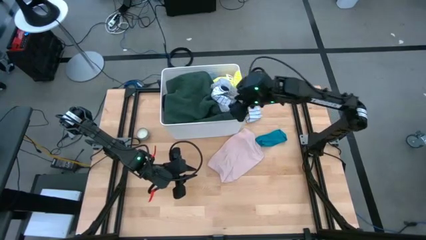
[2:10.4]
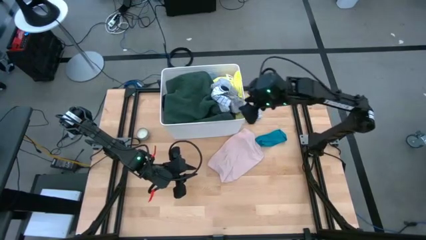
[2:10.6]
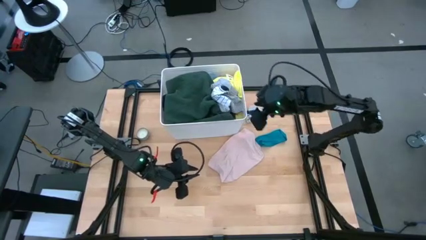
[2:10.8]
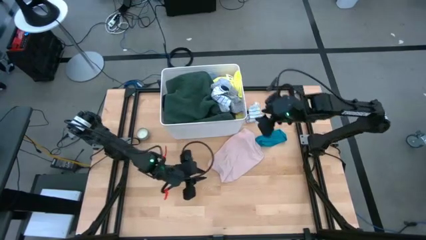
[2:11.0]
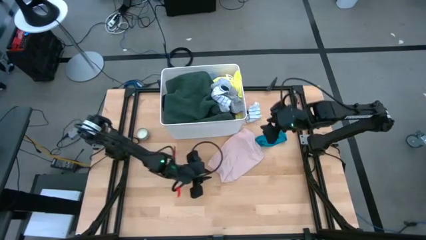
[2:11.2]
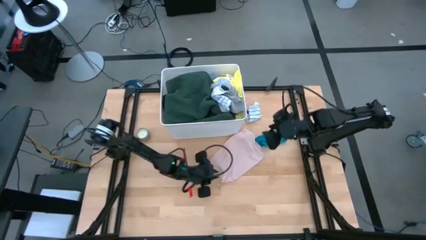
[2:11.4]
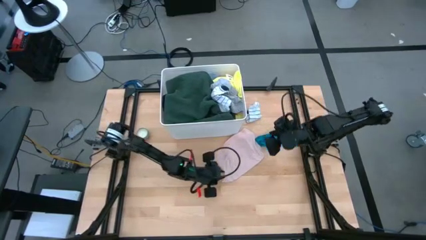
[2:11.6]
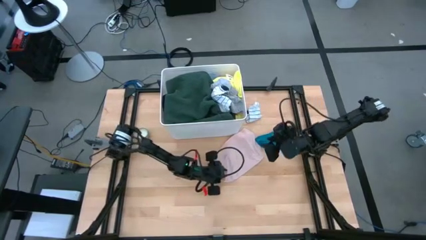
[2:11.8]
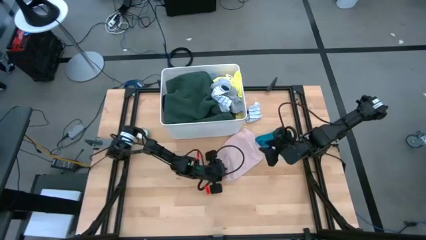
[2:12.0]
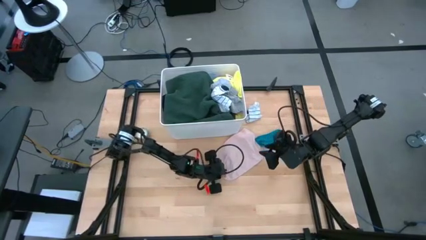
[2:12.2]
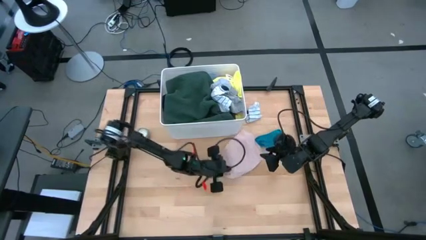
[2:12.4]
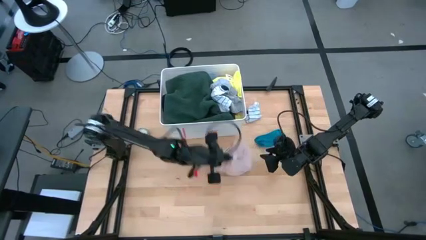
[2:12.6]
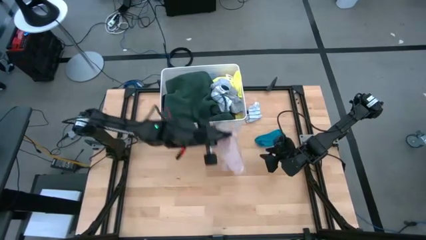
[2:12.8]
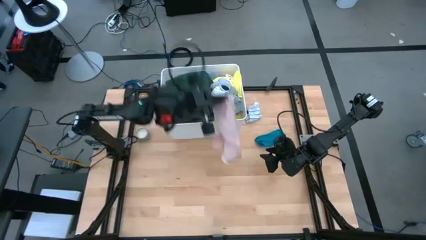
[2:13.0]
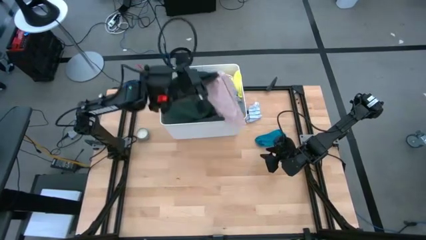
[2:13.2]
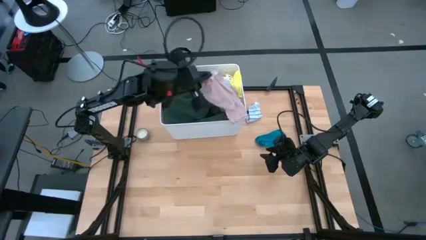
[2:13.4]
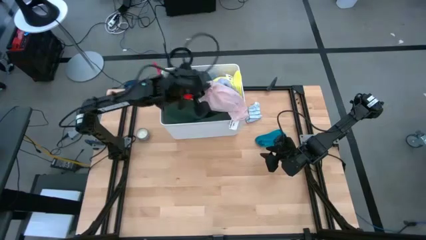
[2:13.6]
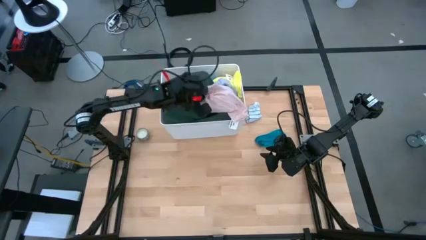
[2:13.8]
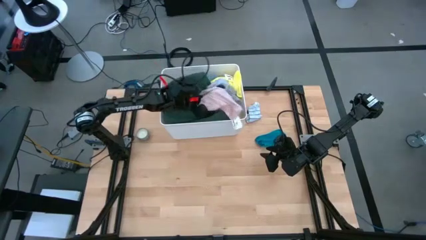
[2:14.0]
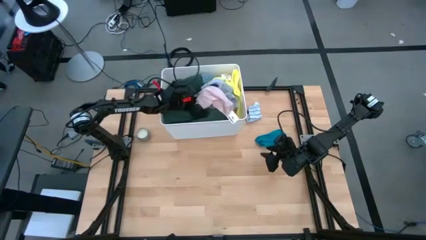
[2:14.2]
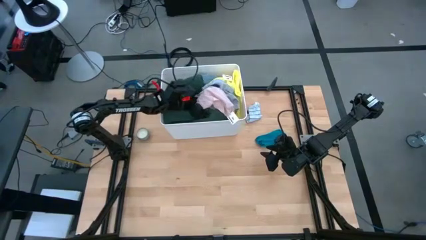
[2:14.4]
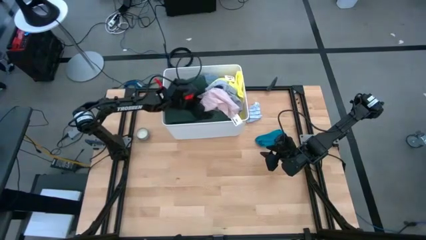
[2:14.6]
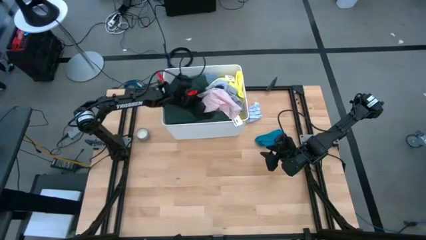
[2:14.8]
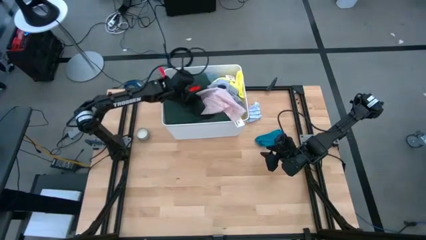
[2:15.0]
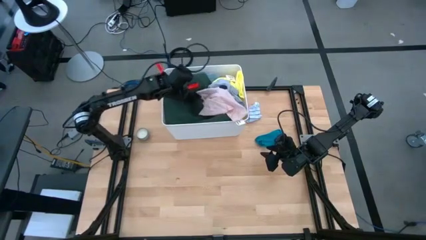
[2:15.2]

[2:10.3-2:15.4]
Task: Sort clothes
Put the pink boxer into the laundry bin

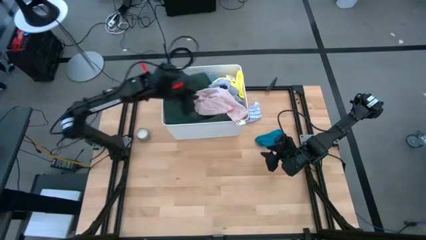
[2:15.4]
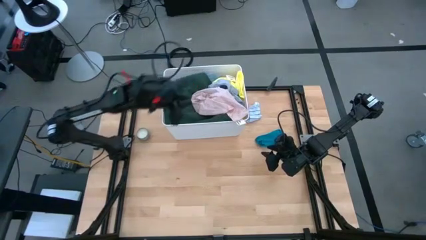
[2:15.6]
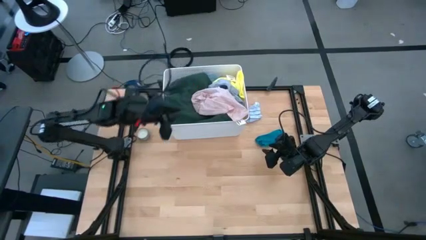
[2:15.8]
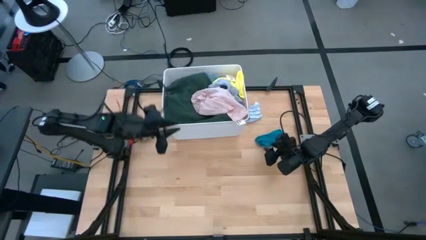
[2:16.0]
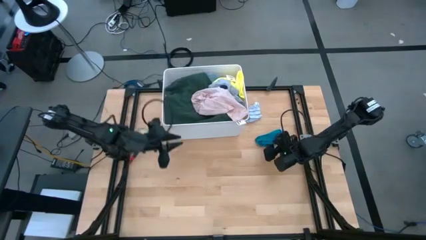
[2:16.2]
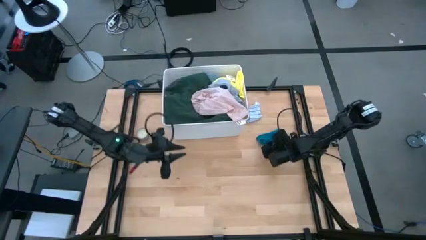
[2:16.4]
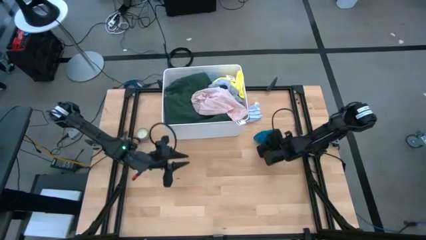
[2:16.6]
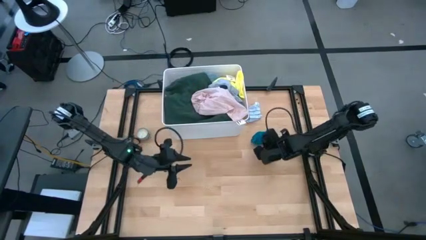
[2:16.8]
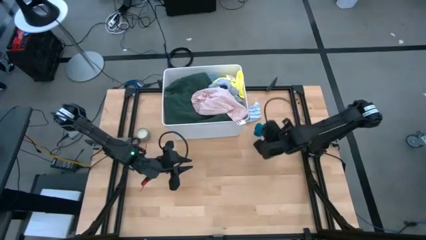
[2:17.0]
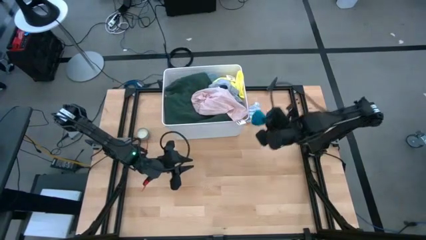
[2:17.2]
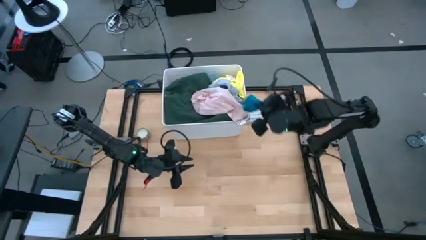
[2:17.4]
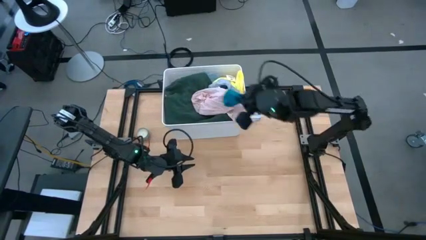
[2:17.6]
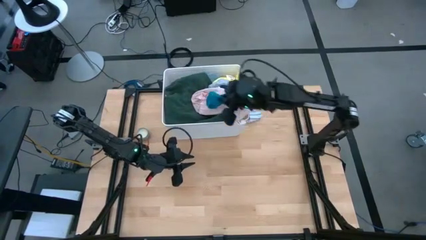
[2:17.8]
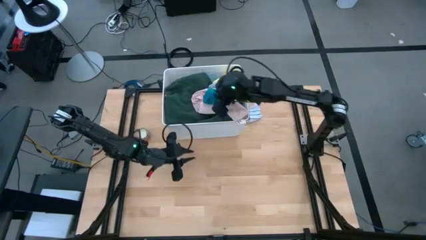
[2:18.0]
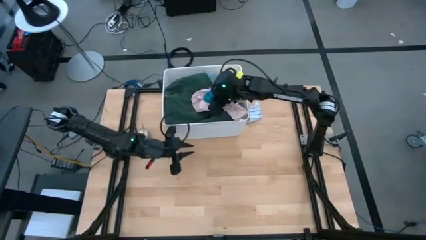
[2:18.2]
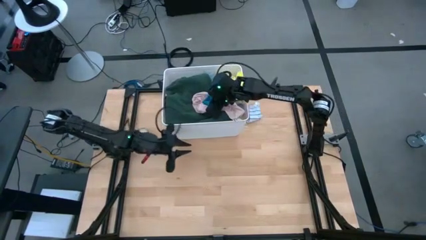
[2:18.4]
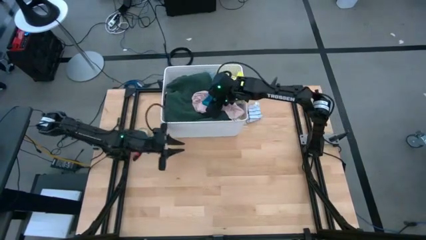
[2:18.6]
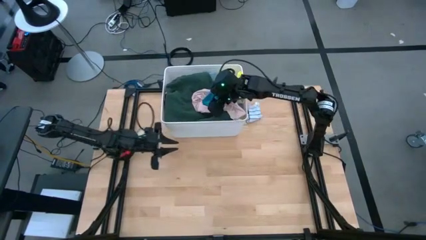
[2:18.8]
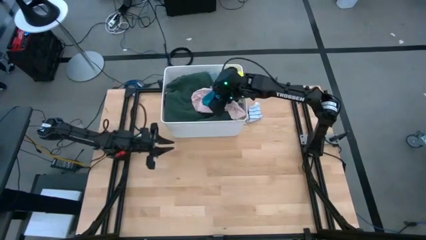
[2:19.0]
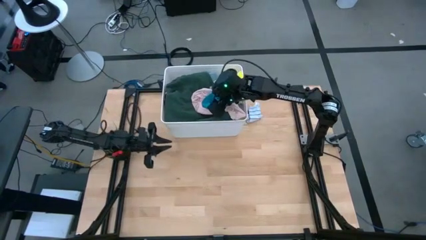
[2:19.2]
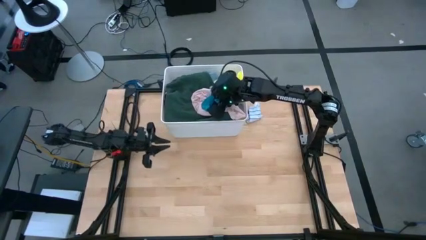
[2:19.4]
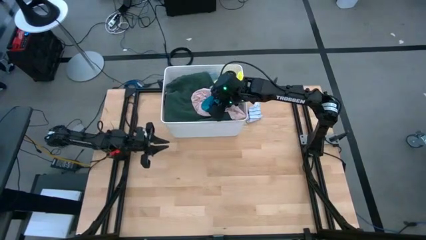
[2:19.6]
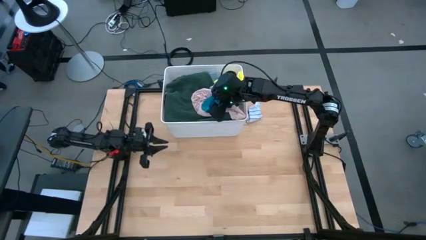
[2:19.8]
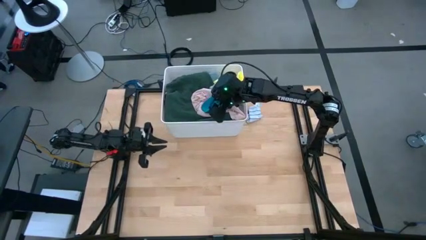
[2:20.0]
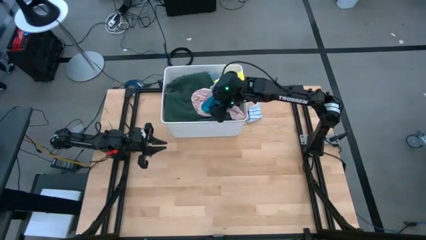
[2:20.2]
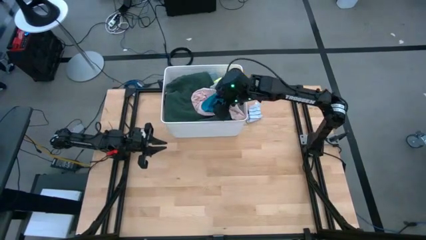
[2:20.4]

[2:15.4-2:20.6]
Put the blue sock into the laundry bin

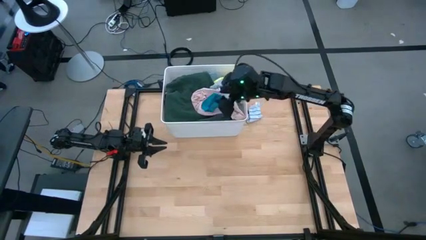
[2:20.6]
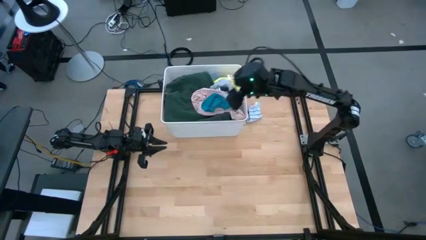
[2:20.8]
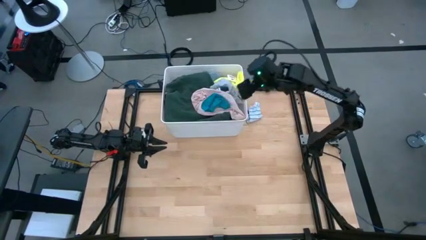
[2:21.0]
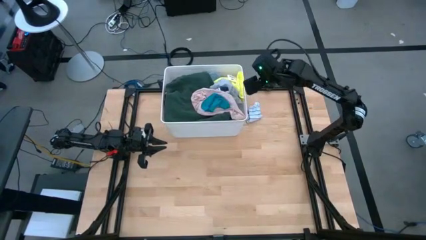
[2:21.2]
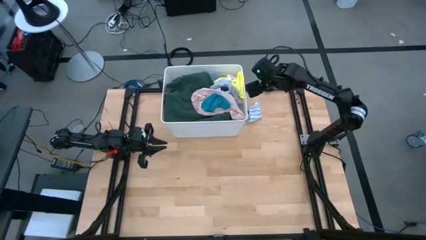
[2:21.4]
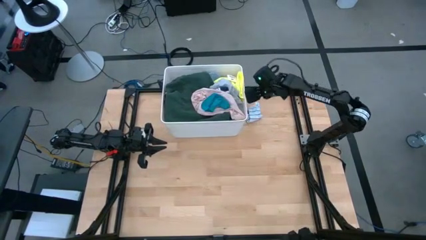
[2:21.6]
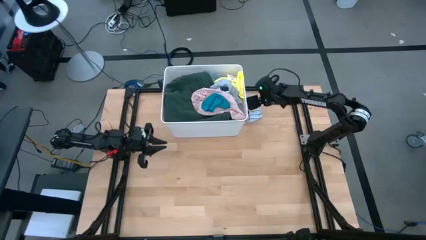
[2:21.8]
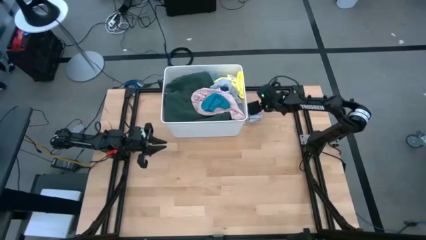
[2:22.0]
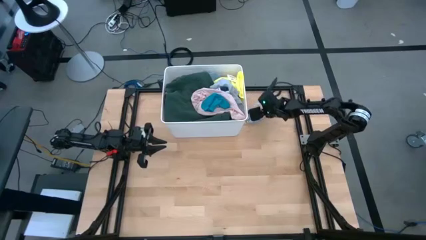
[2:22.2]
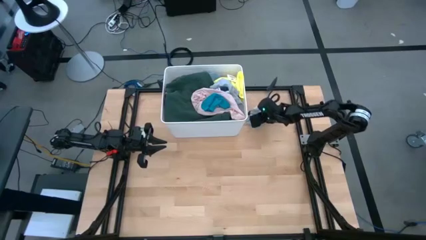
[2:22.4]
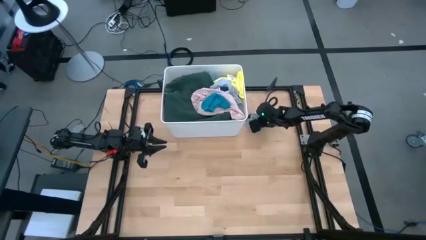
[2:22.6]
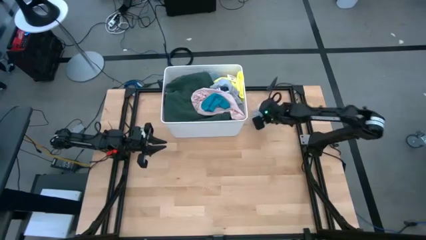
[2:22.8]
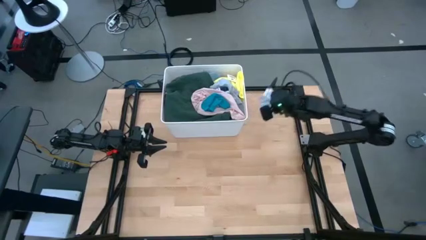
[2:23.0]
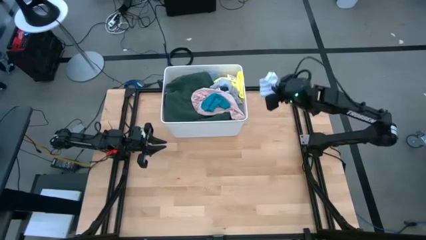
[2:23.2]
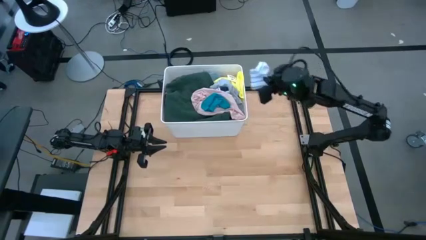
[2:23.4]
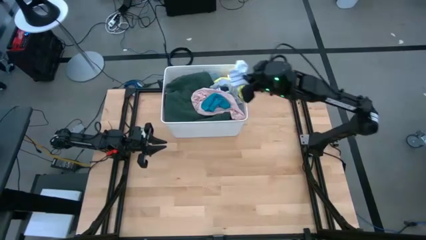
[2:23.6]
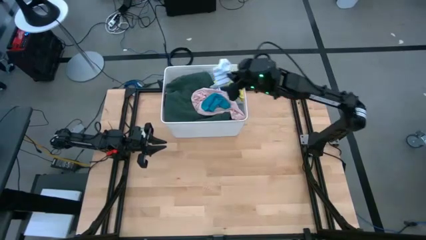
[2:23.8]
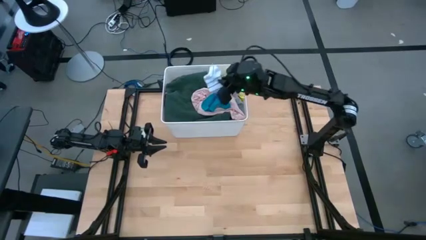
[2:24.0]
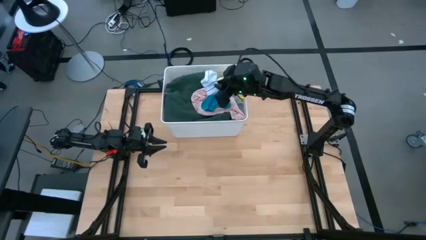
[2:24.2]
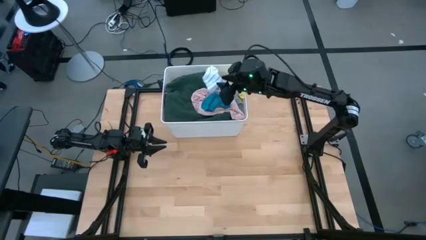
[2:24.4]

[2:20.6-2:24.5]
Put the white patterned sock into the laundry bin

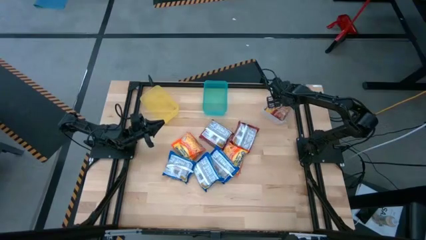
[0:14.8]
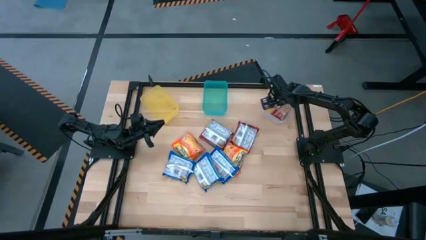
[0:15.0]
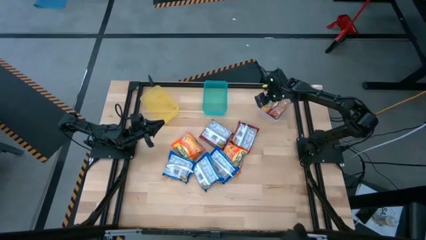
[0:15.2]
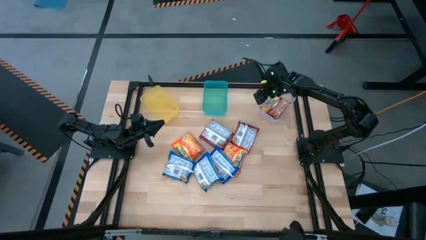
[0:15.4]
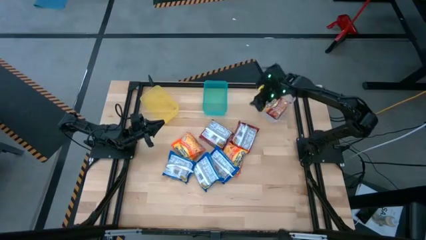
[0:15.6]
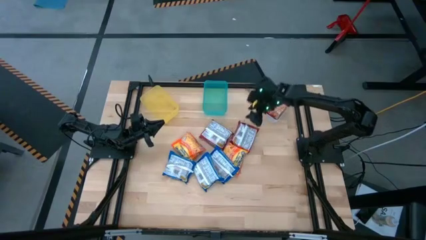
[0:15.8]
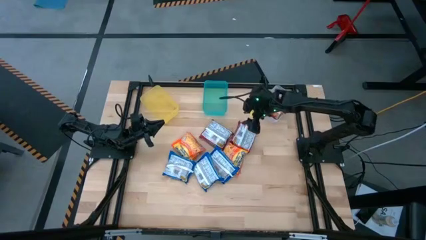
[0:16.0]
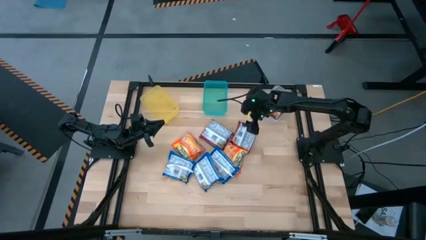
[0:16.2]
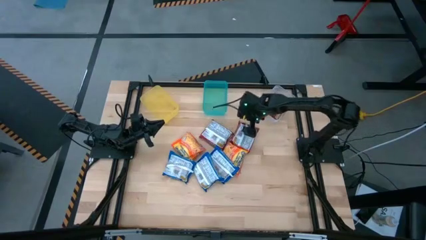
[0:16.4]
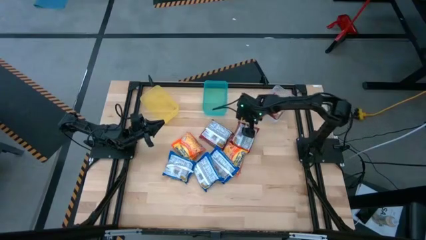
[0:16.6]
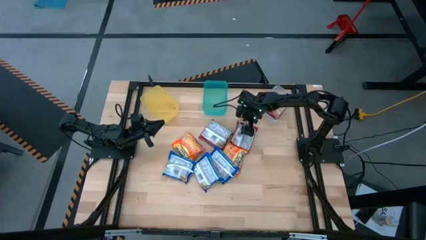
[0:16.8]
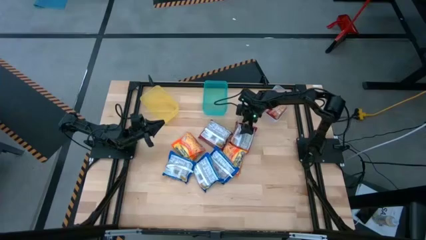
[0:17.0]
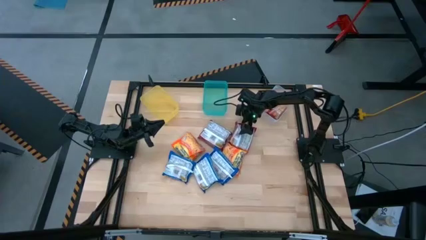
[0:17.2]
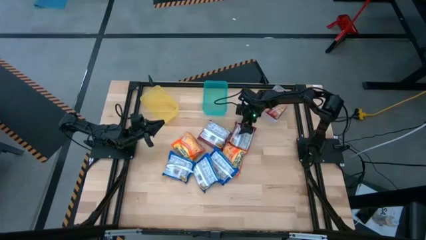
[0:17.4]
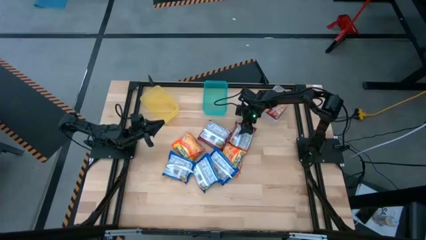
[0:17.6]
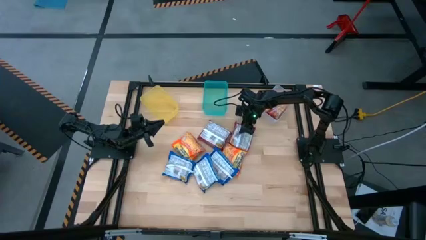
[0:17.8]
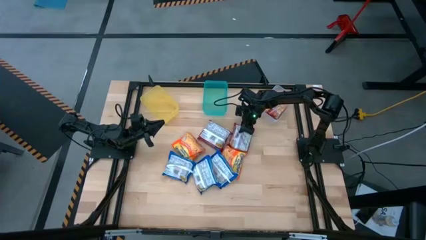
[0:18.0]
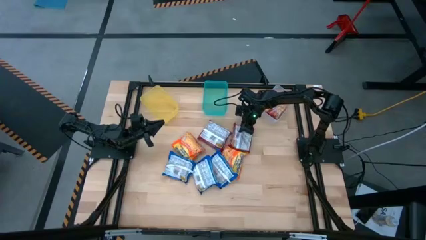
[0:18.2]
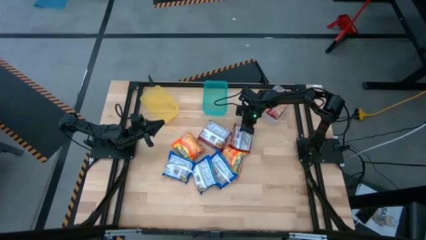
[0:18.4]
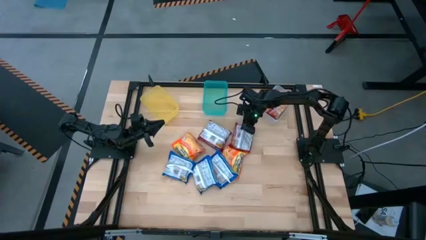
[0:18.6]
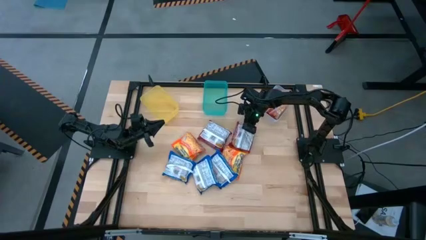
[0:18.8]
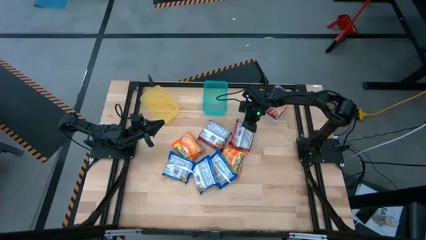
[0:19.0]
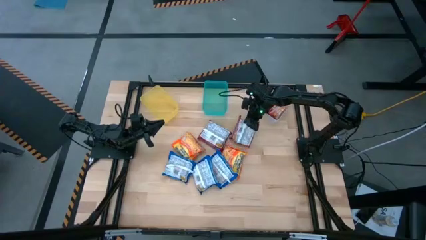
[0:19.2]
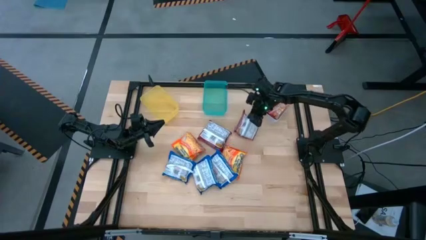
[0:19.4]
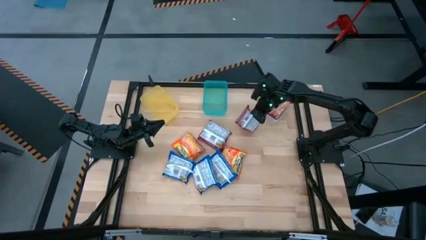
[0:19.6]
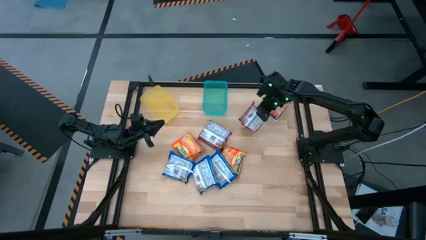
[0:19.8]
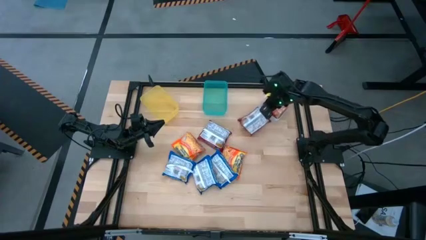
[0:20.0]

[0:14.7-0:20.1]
Task: Sort Maruchan noodles
Put the right red noodle pack into the transparent bin
